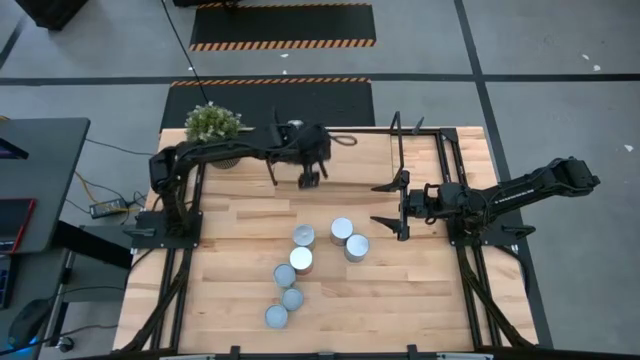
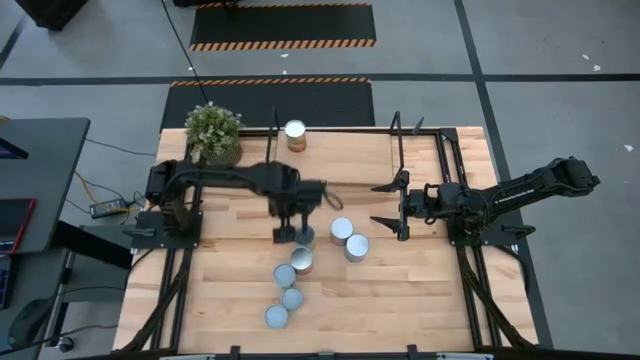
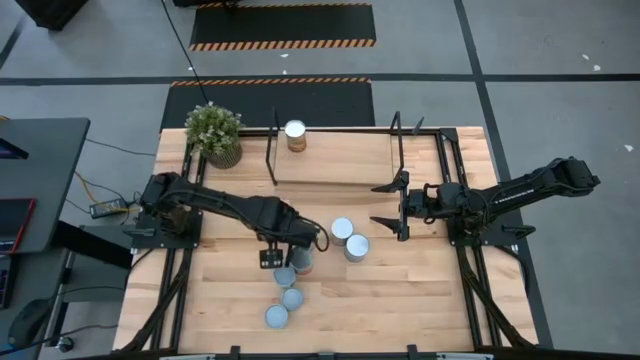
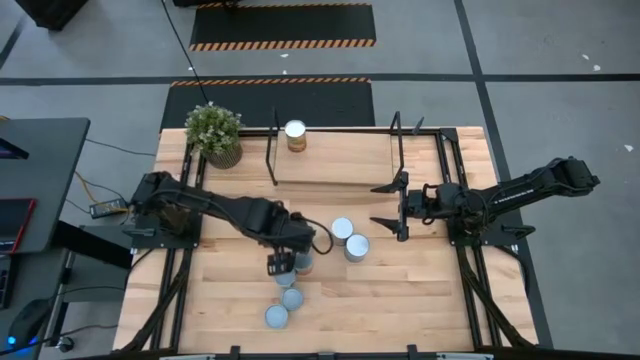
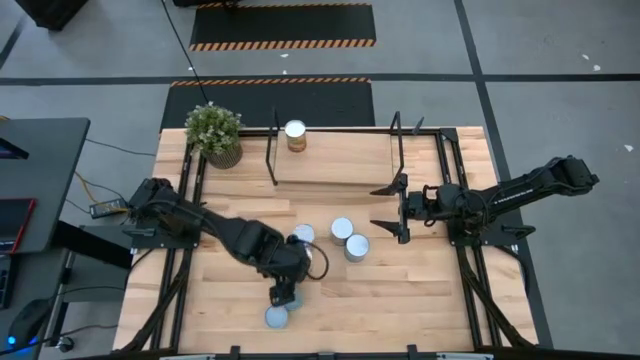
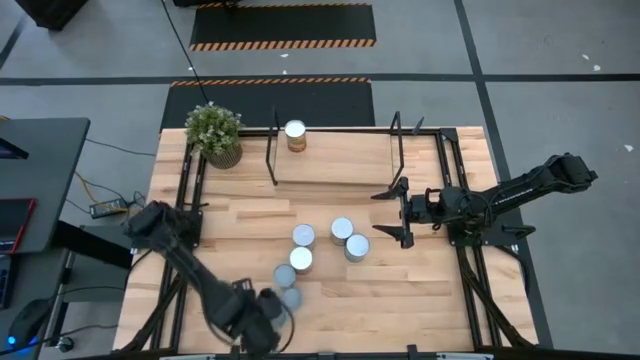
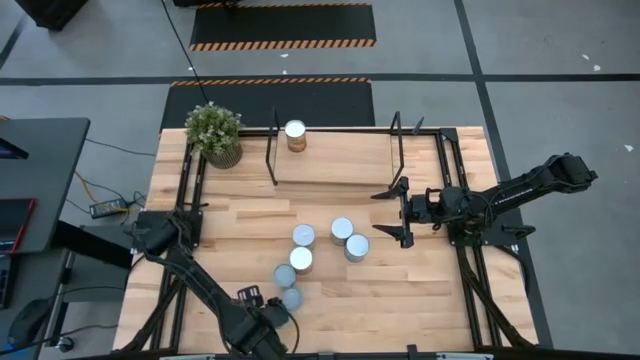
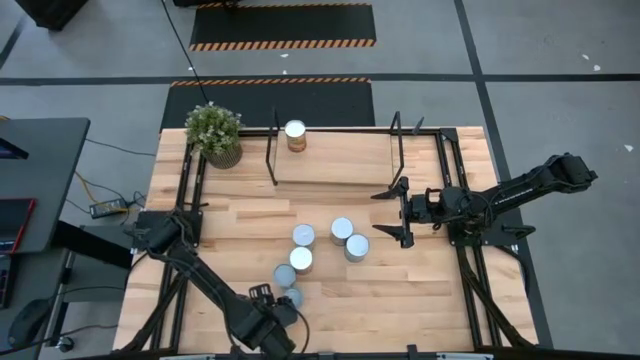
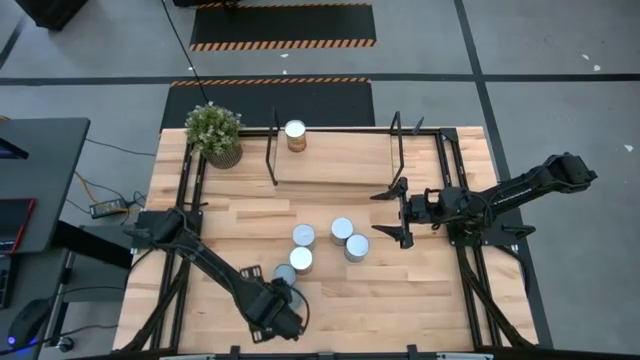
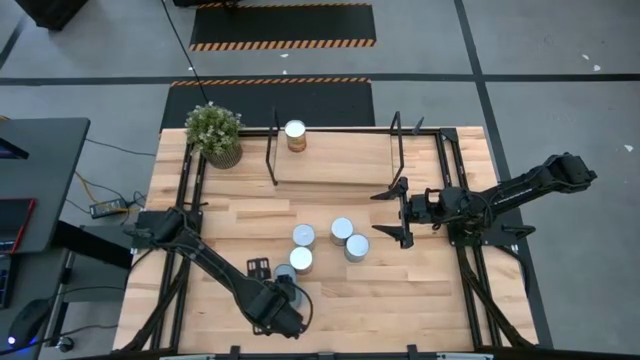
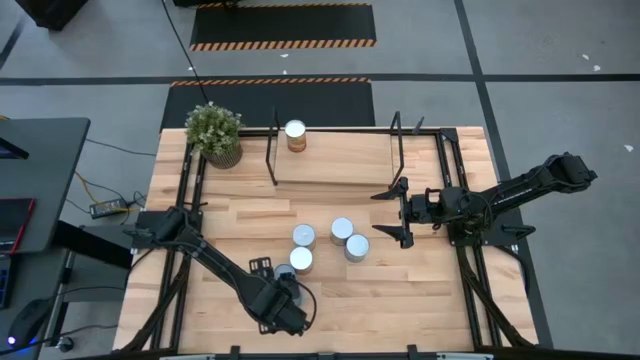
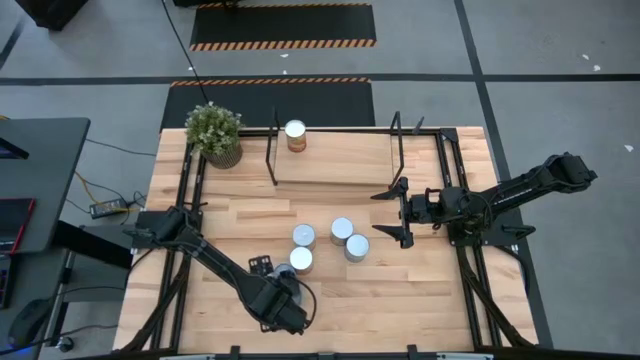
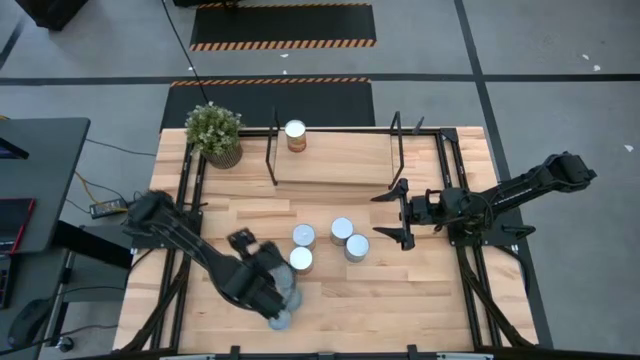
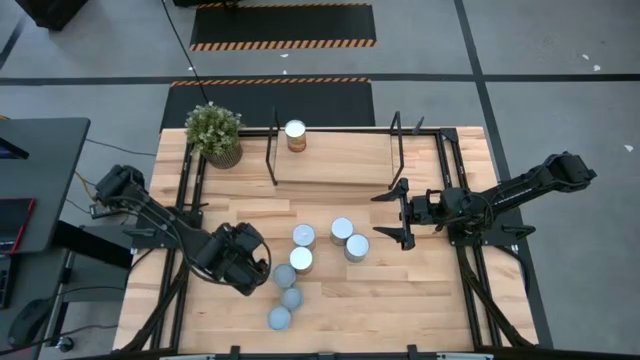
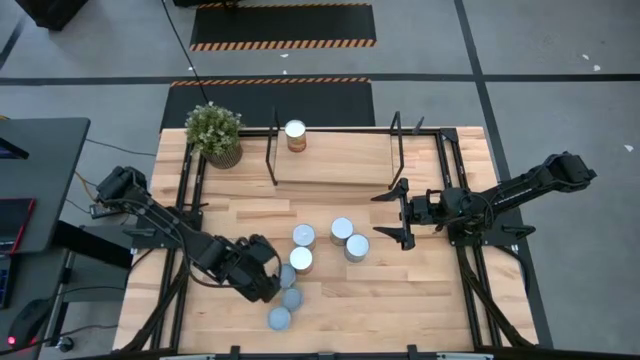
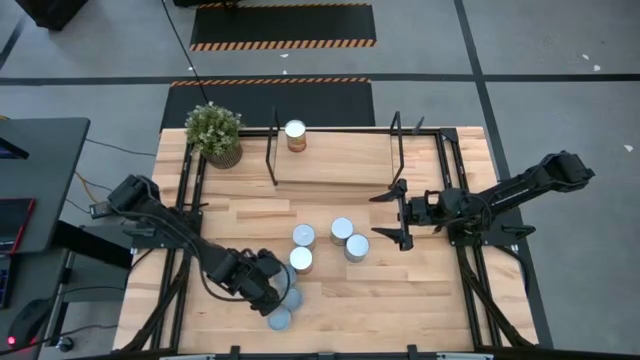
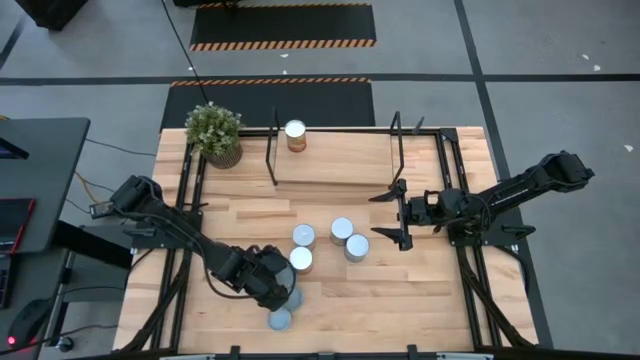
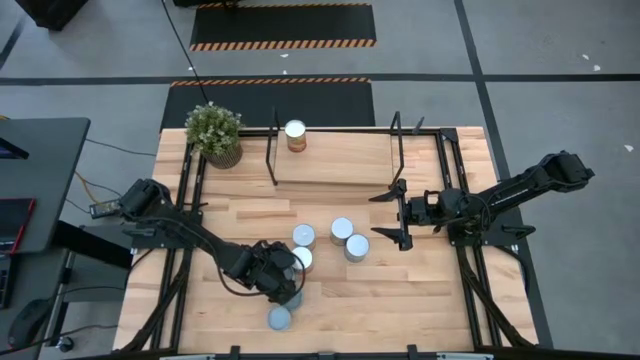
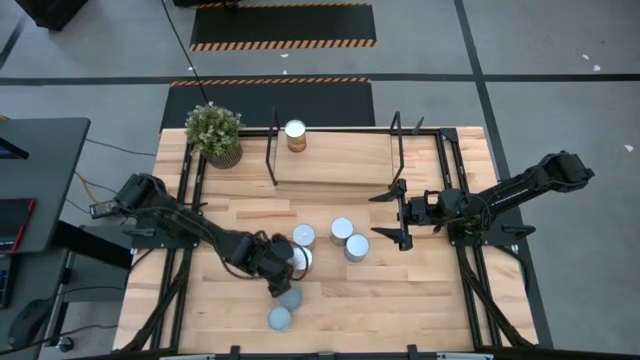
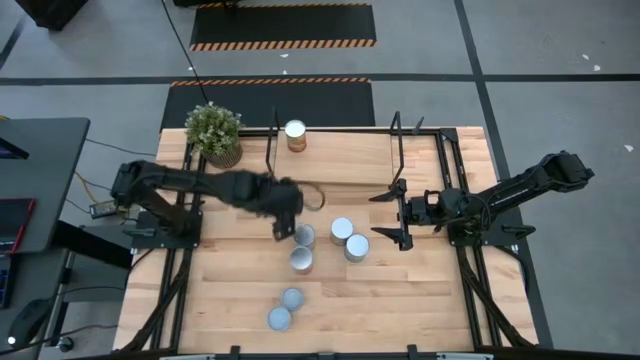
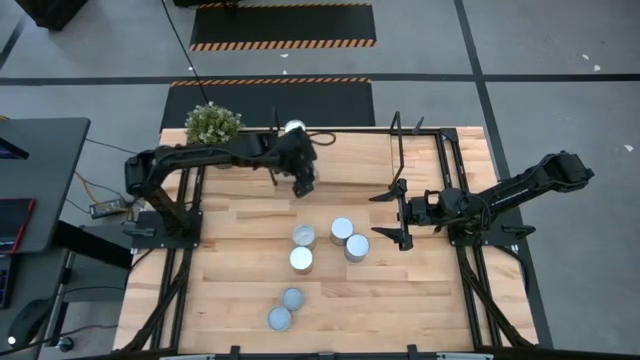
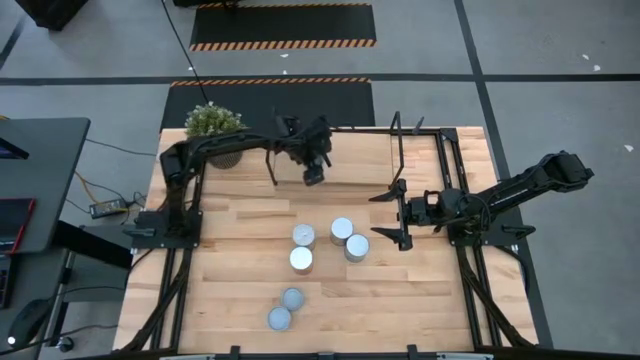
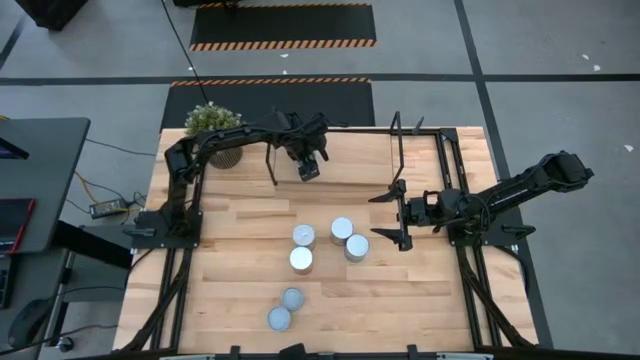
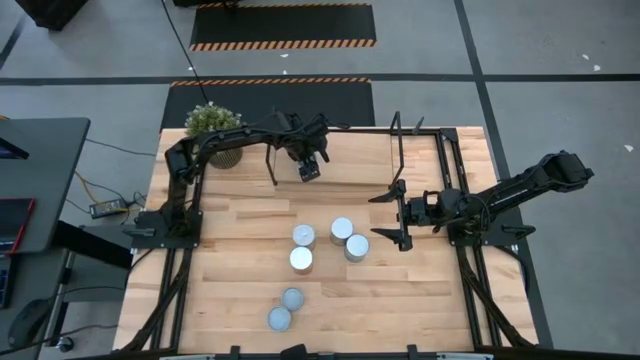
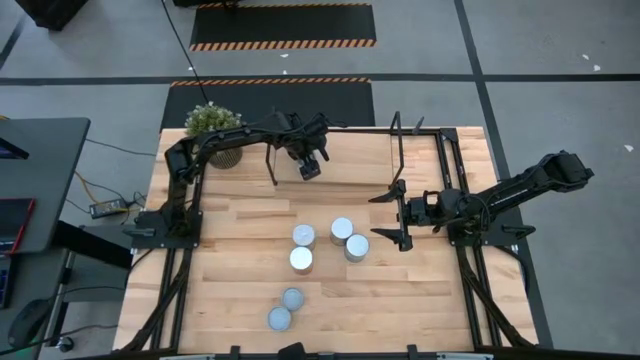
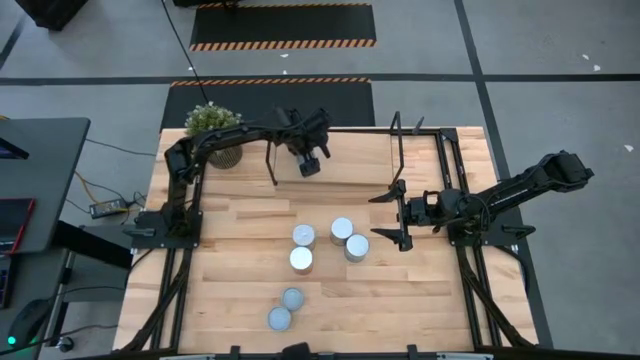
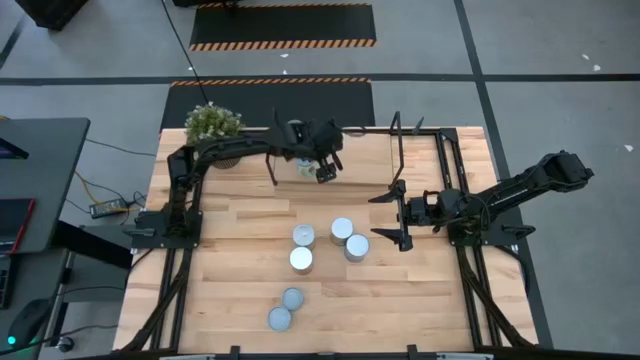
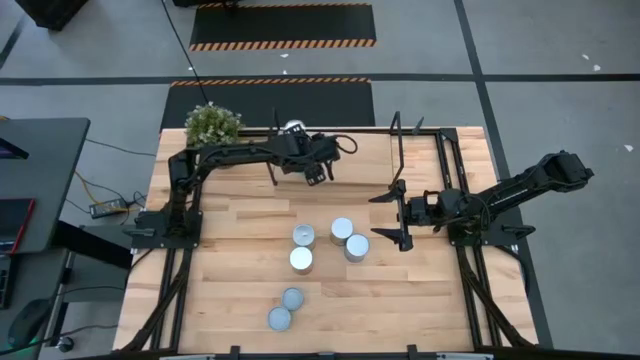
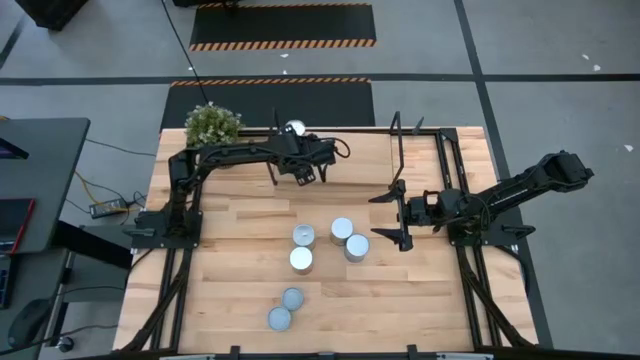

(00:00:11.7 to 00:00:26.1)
Task: Pick and place cans onto a shelf
Put the canned vegetable on the shelf

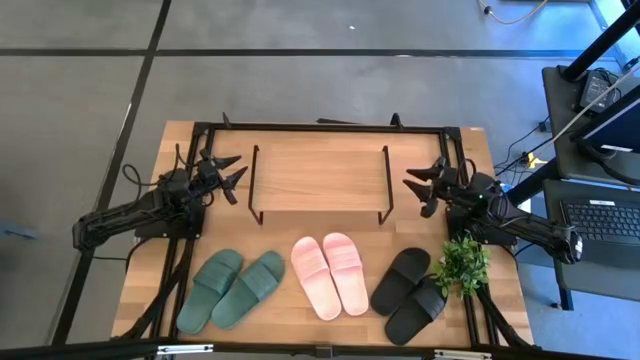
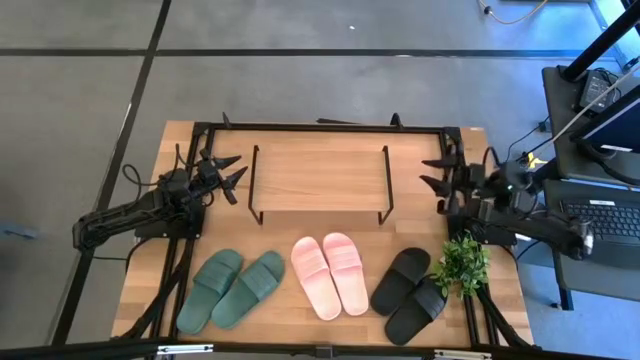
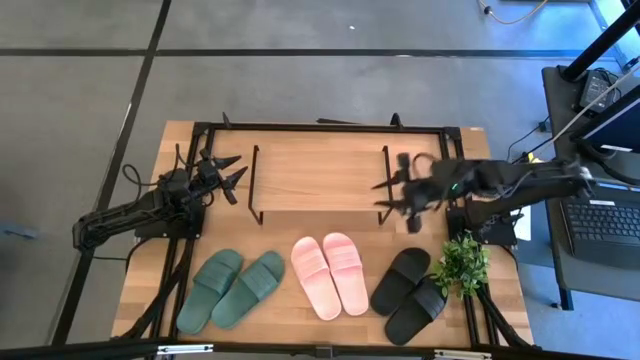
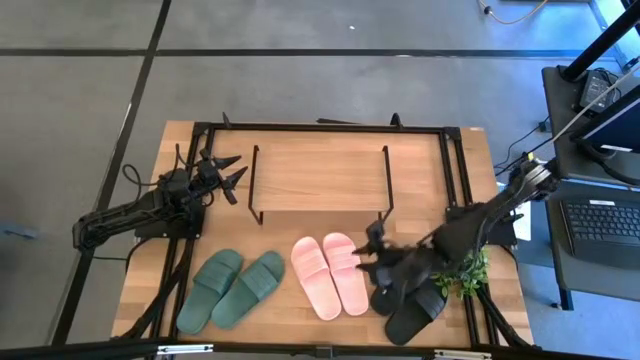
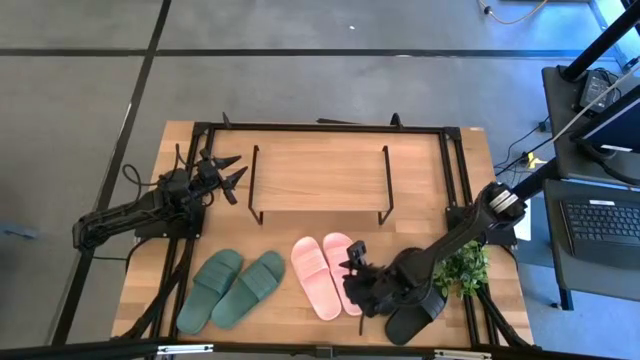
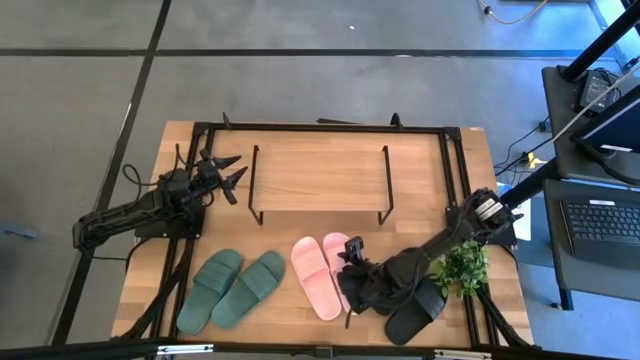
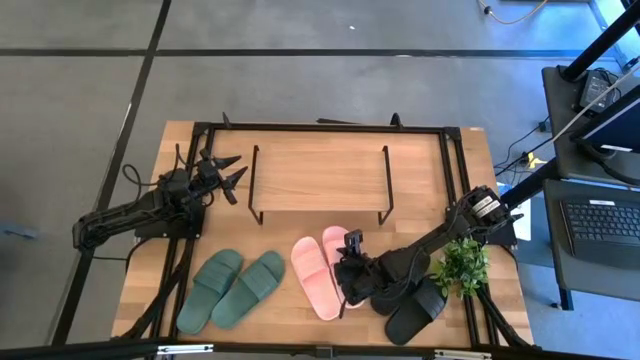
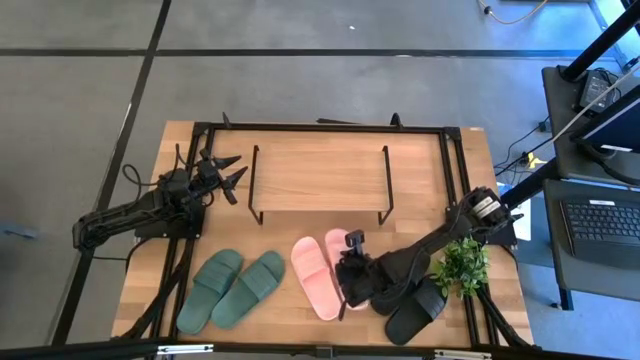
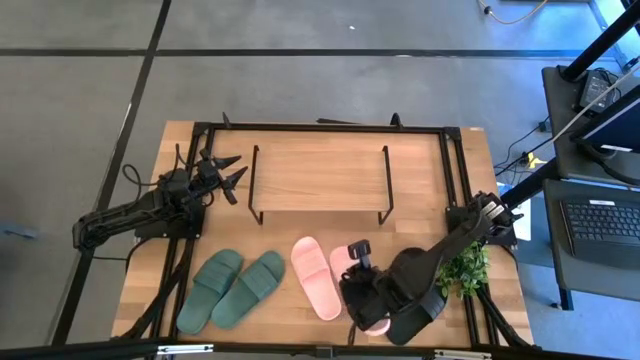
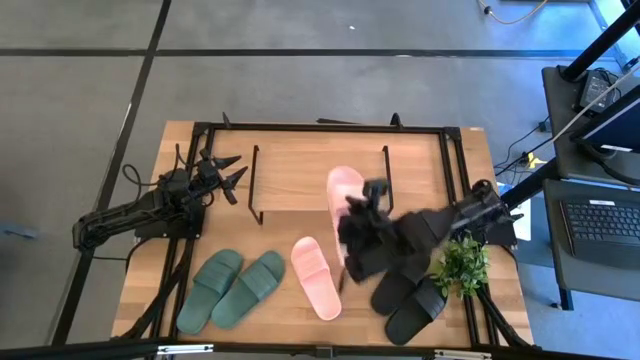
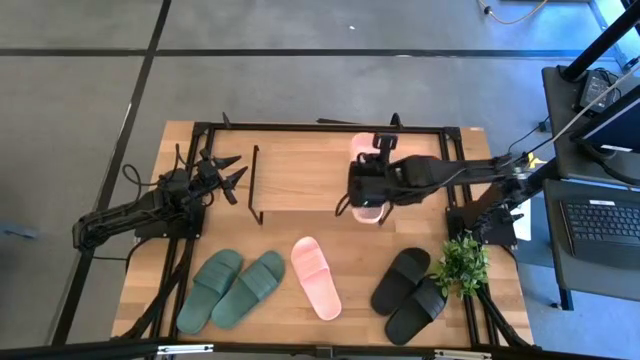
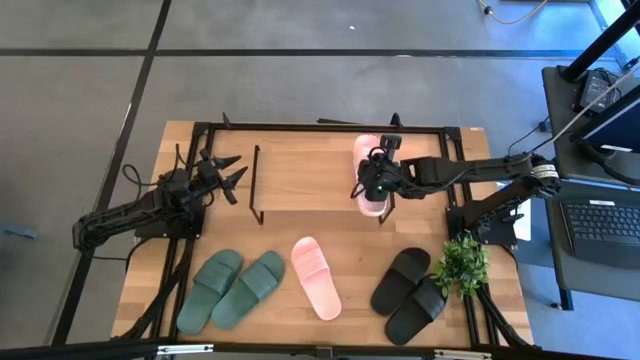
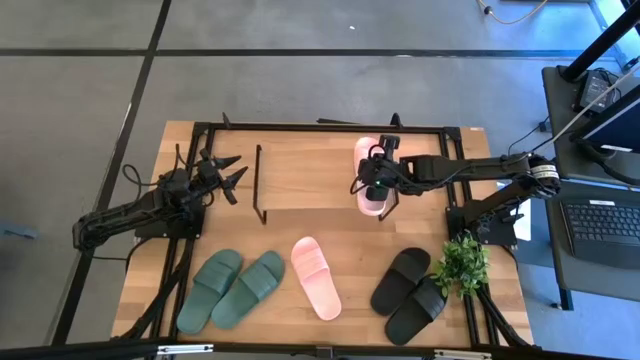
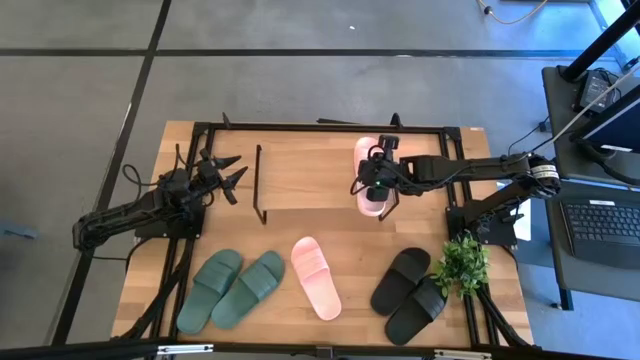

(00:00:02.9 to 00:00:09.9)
Task: Pick and place slides into the shelf
Put the right pink slide on the shelf
